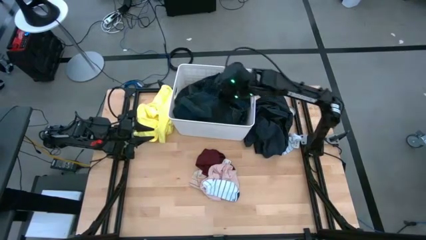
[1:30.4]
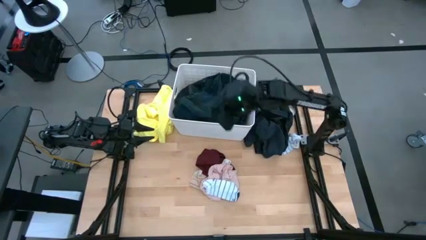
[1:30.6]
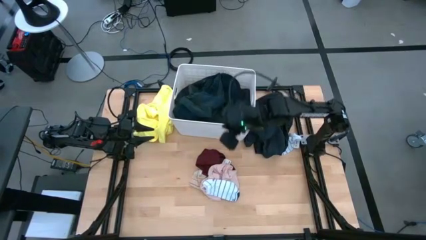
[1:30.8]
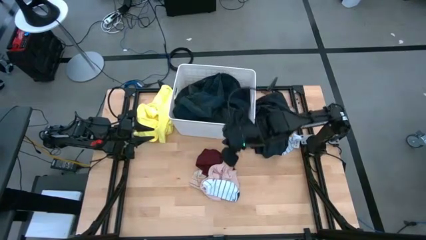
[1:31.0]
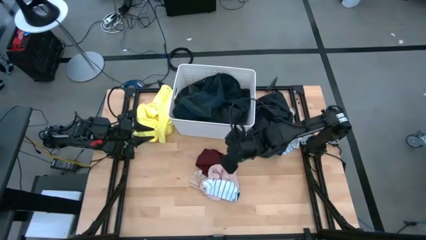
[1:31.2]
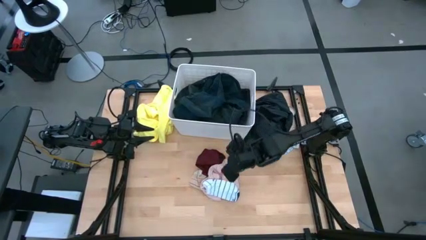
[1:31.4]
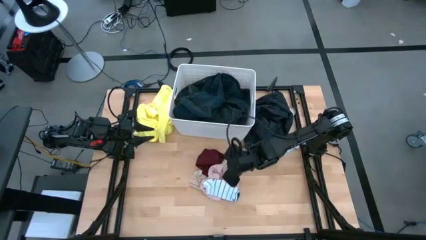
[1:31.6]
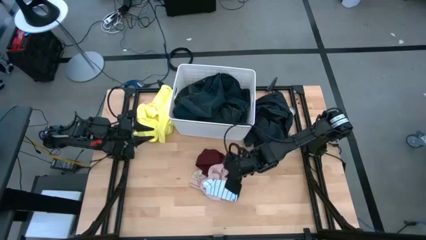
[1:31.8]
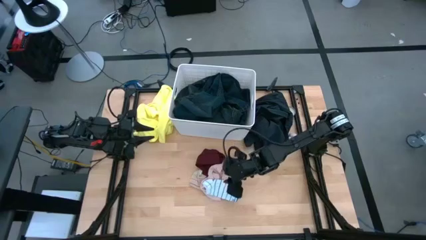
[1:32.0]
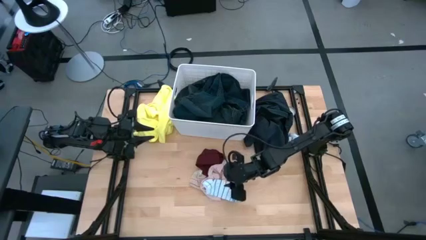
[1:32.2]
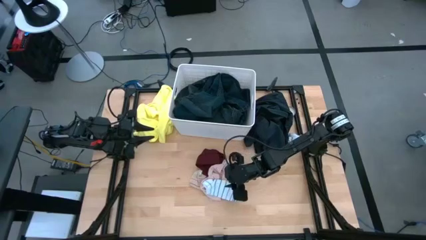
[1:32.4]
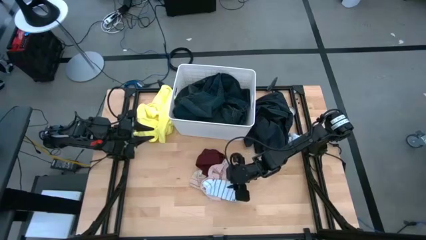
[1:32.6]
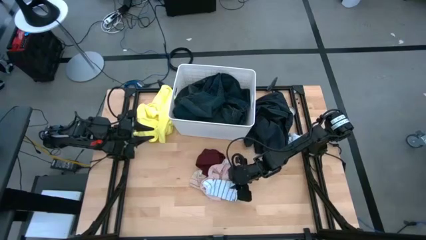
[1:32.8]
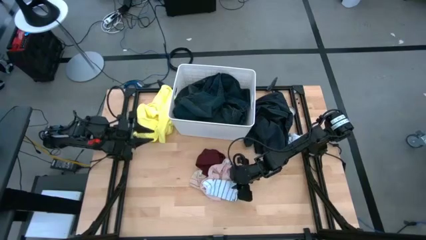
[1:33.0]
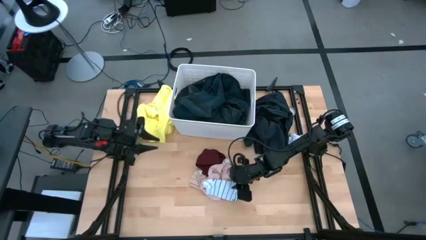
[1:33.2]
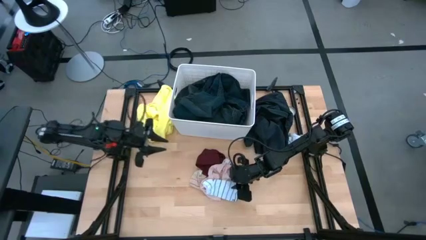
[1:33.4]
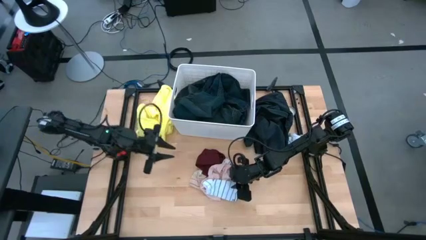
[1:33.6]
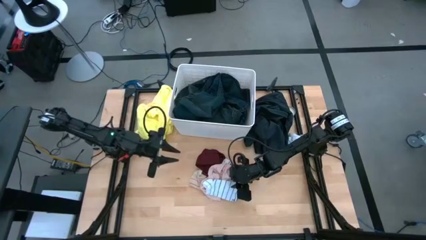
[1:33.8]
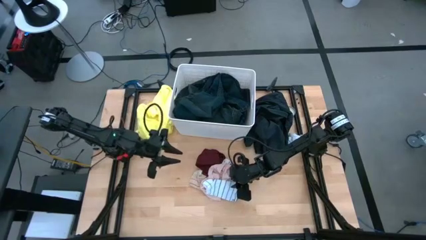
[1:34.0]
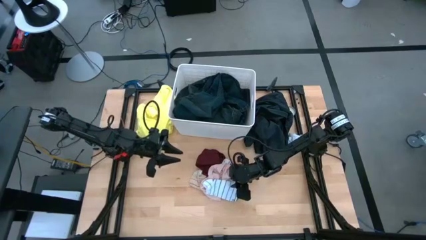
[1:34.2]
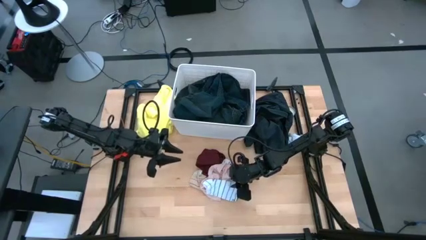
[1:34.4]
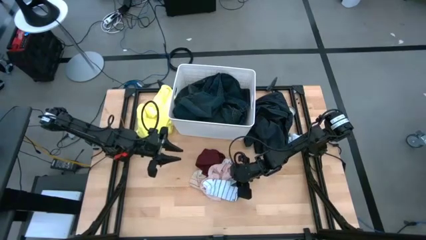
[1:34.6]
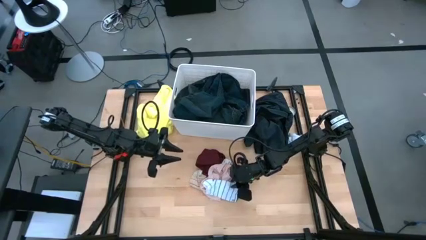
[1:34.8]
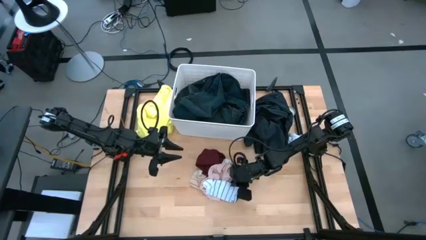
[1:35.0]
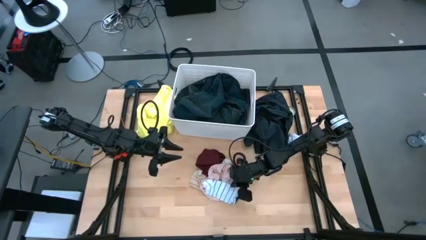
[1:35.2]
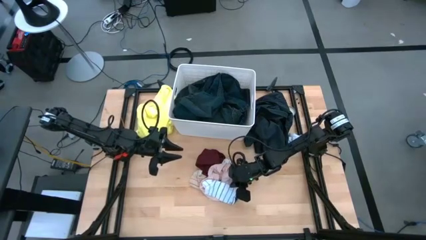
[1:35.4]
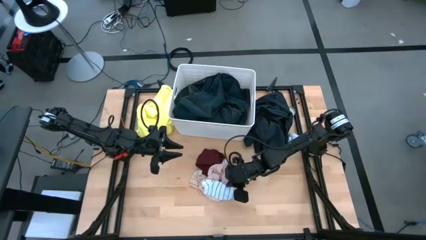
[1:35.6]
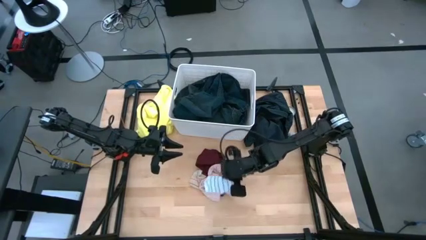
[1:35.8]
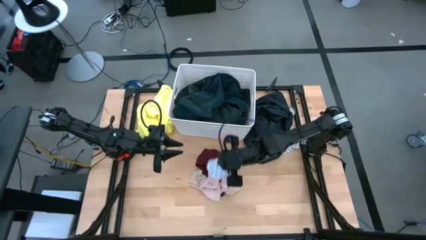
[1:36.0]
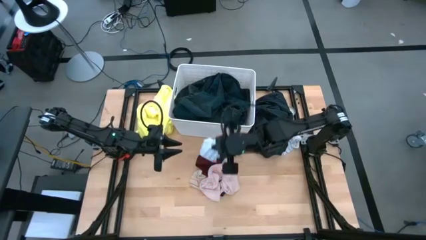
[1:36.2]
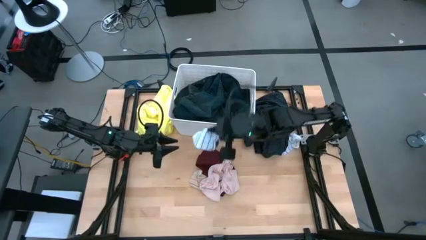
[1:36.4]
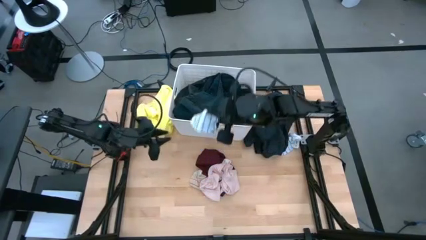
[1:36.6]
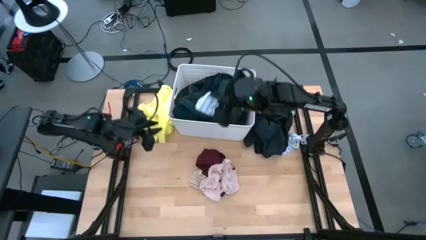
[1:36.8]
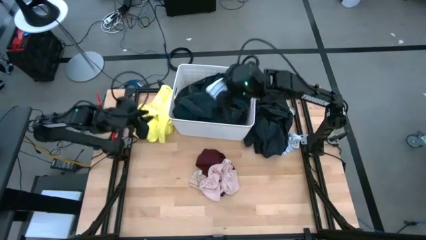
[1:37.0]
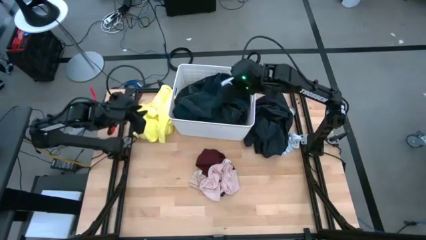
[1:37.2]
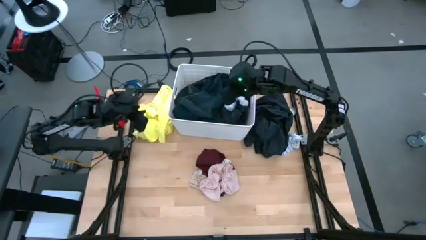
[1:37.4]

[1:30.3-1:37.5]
Task: Sort clothes
Put the bottom white blue sock into the laundry organizer

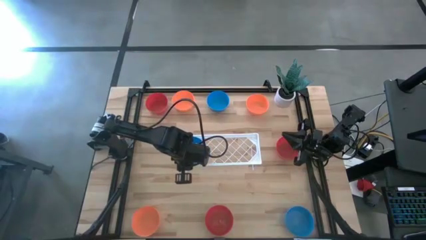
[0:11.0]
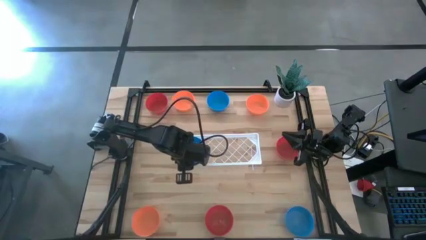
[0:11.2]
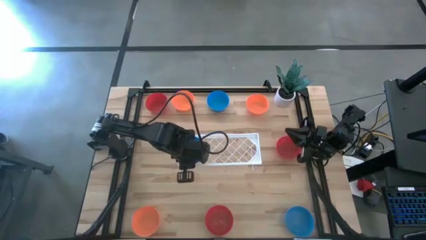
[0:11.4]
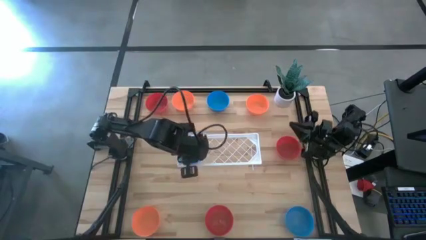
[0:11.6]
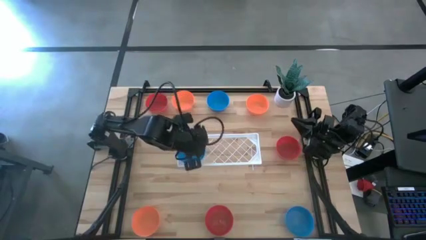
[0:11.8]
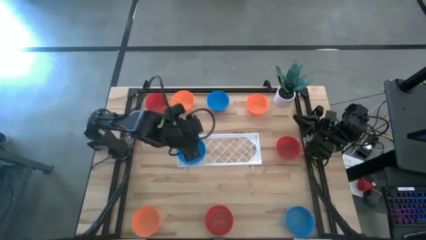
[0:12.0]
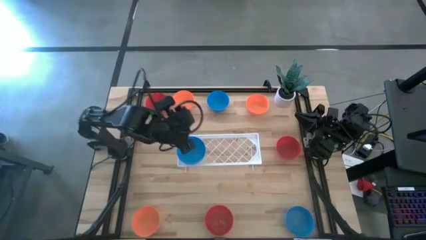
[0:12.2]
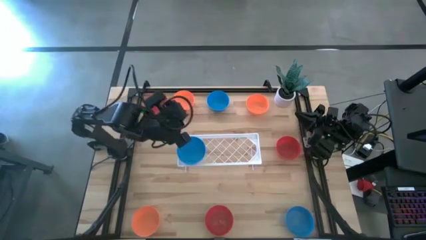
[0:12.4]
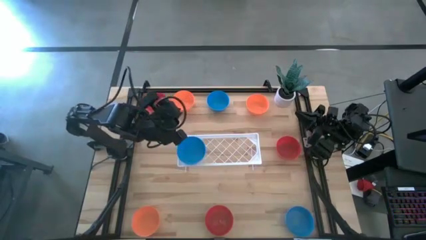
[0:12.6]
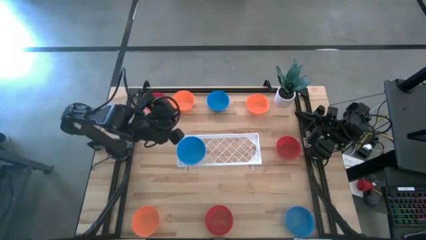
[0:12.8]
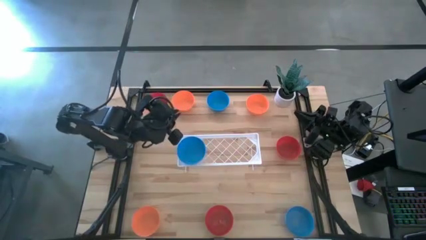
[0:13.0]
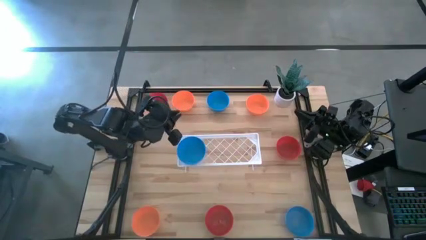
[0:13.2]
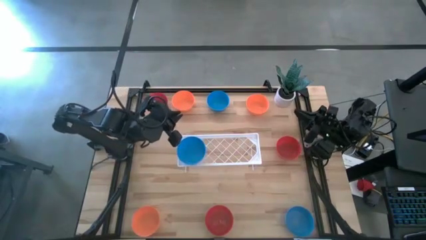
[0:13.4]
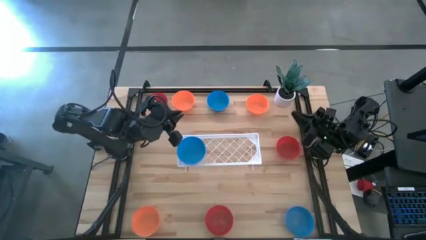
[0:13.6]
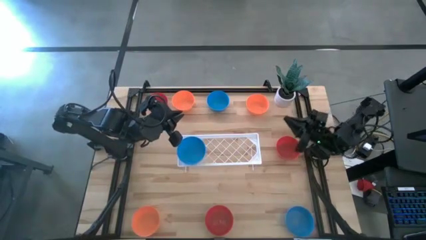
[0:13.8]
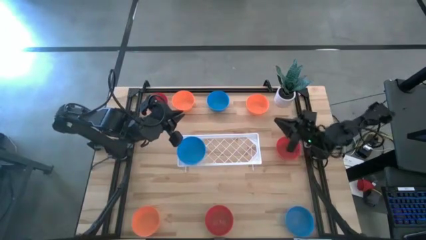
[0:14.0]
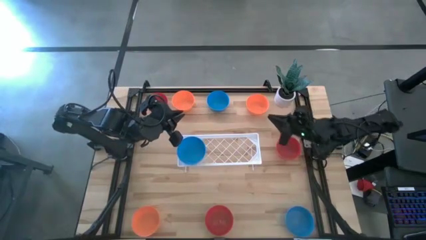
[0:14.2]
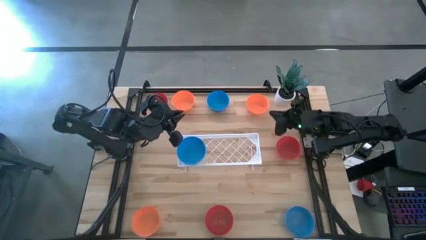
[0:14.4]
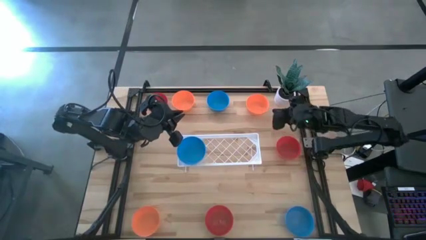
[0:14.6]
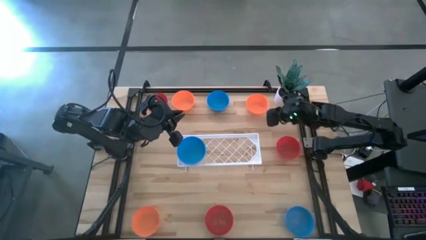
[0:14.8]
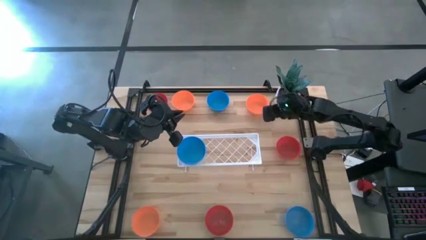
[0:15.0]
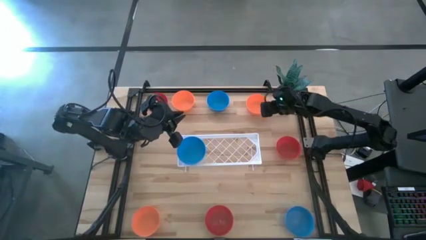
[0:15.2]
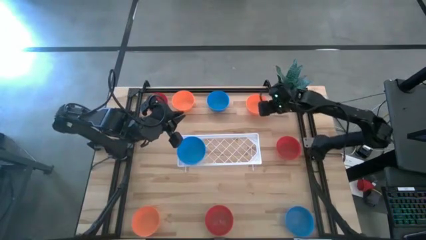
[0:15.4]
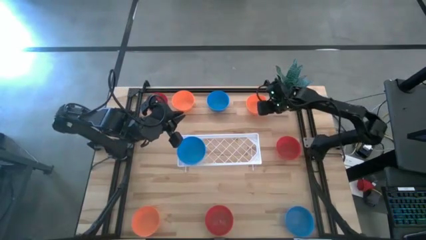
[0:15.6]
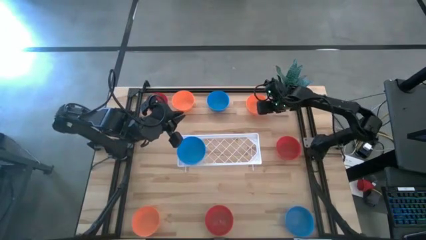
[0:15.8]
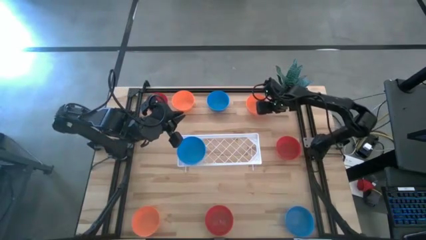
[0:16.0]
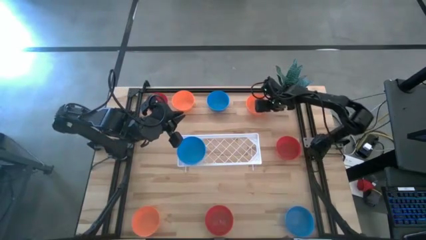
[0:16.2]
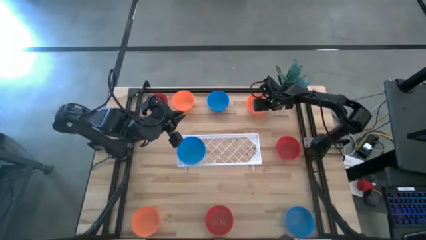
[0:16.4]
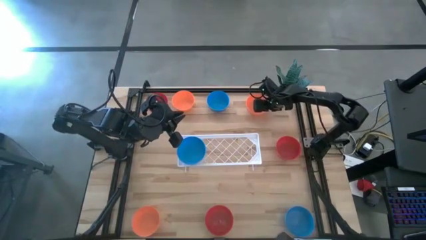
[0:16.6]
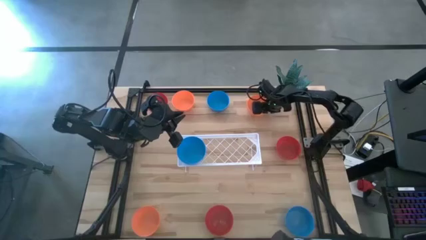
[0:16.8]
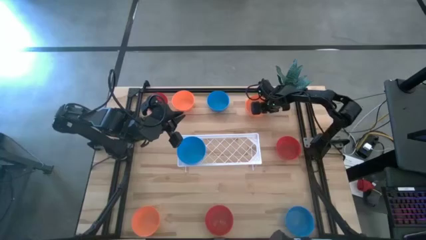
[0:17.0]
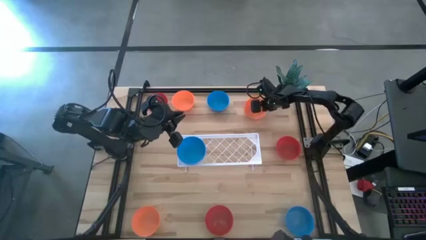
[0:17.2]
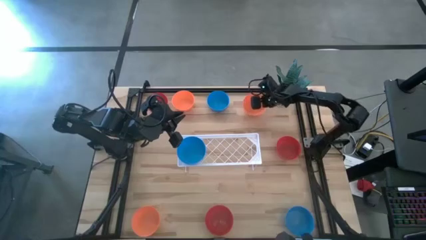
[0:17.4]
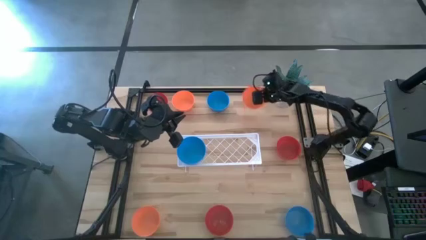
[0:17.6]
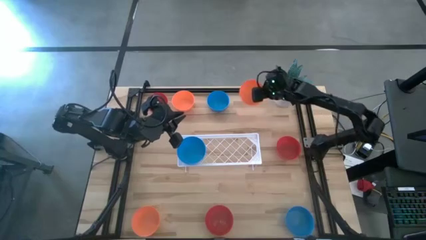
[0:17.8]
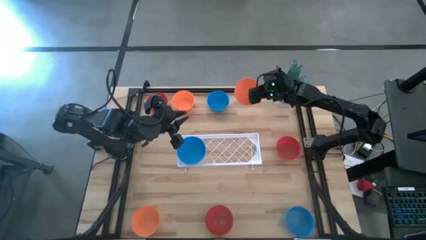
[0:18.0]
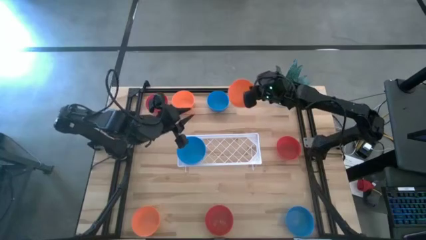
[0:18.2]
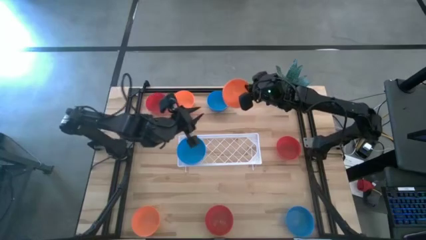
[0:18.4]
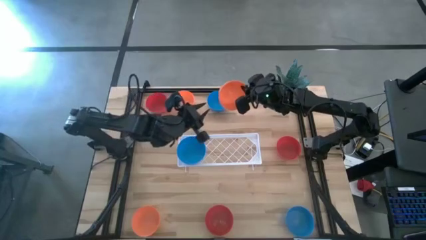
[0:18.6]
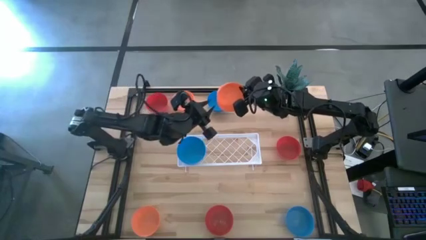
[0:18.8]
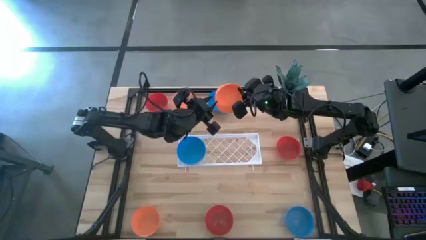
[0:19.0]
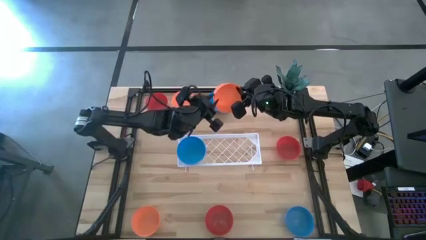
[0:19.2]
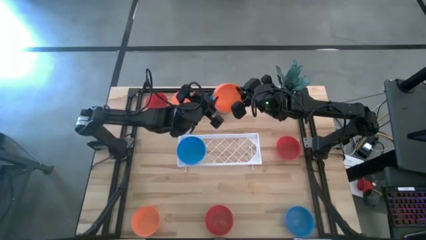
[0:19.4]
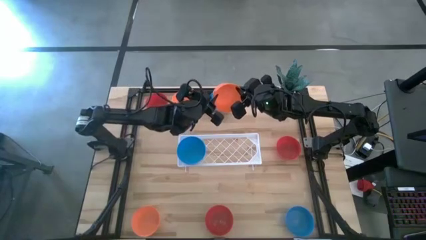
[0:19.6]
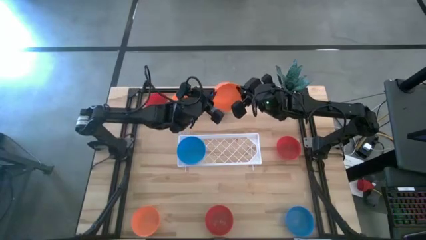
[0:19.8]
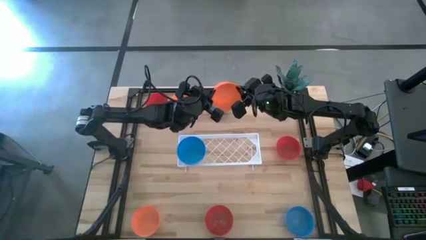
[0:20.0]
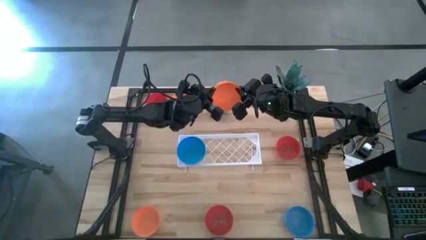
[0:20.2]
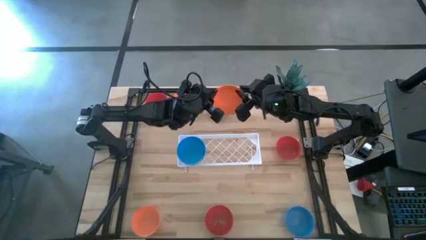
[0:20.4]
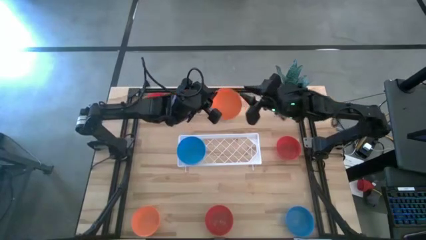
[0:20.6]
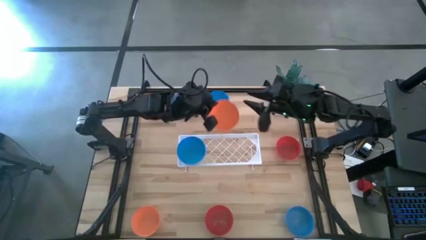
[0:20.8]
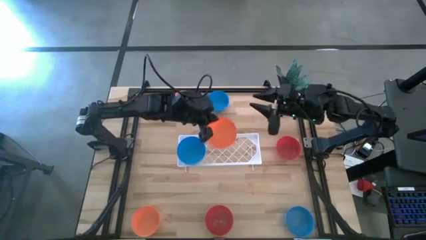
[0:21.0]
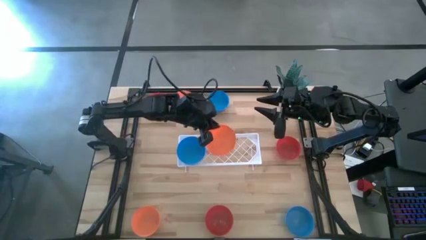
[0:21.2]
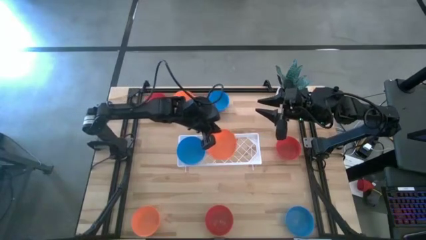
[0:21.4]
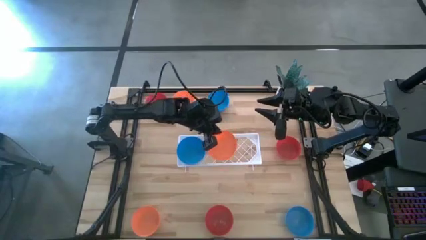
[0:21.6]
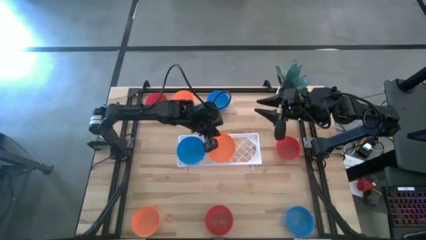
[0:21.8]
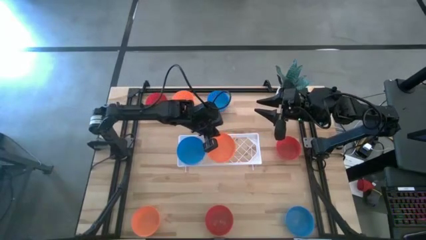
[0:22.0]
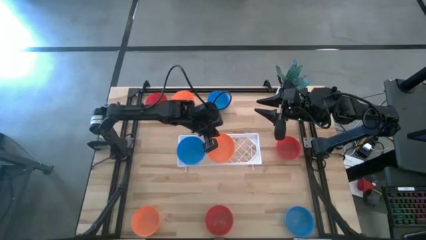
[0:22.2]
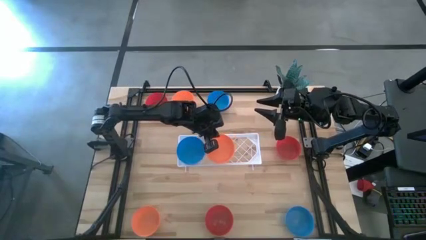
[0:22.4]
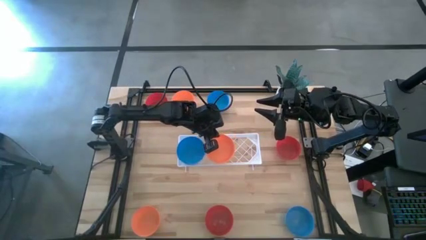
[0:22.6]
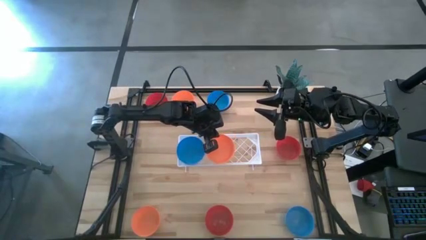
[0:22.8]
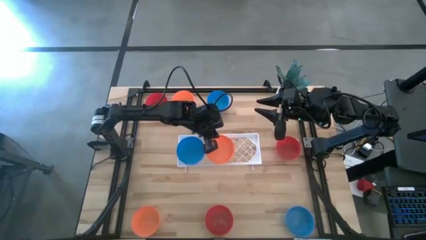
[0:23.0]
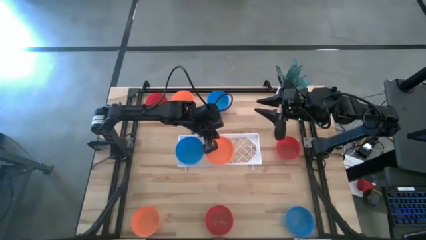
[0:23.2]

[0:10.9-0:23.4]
Task: Pick & Place Mini bowls
Put the top right orange bowl on the shelf
